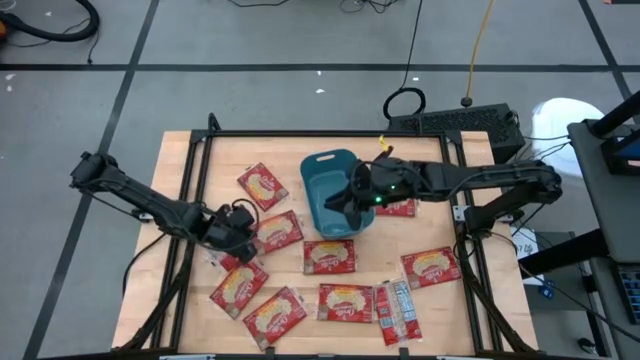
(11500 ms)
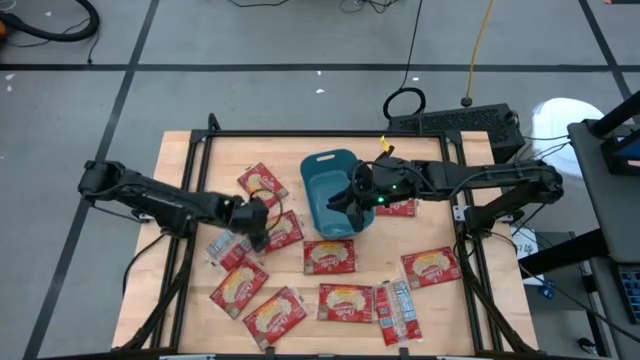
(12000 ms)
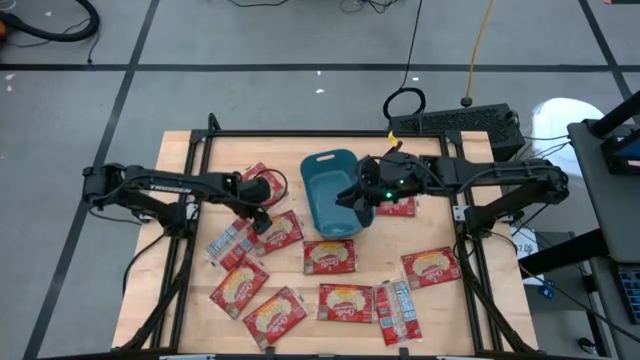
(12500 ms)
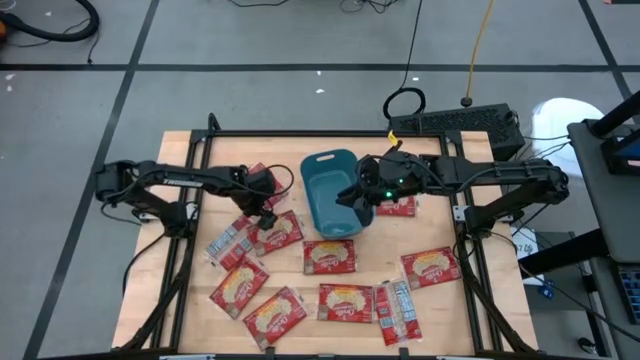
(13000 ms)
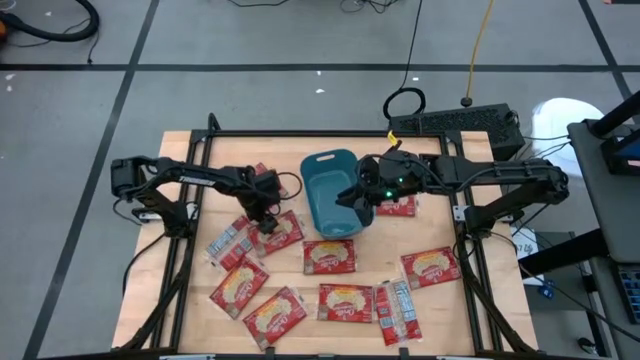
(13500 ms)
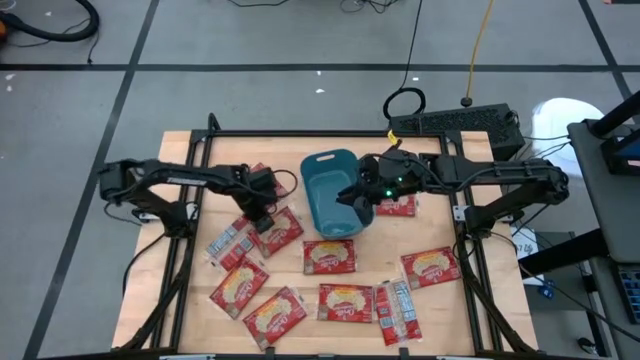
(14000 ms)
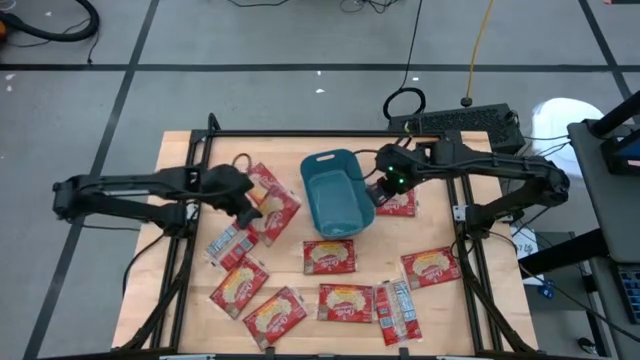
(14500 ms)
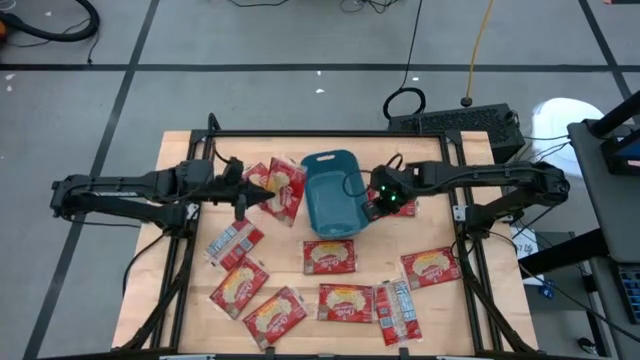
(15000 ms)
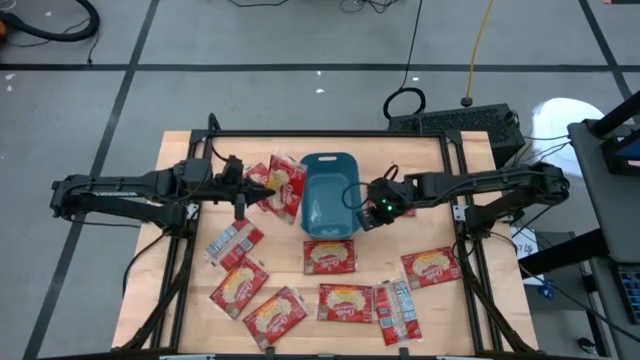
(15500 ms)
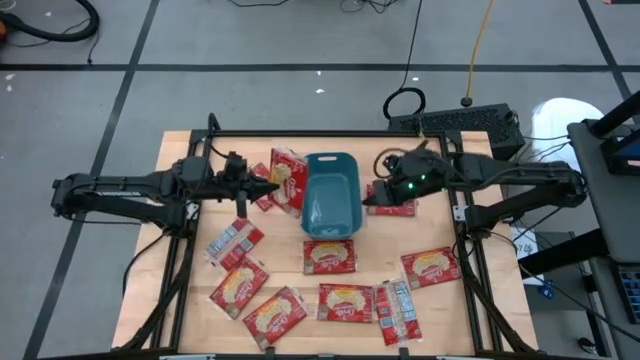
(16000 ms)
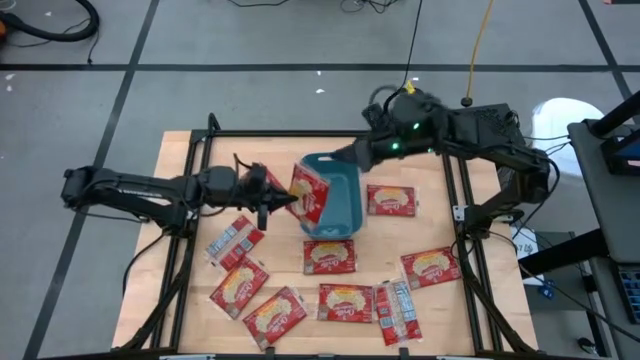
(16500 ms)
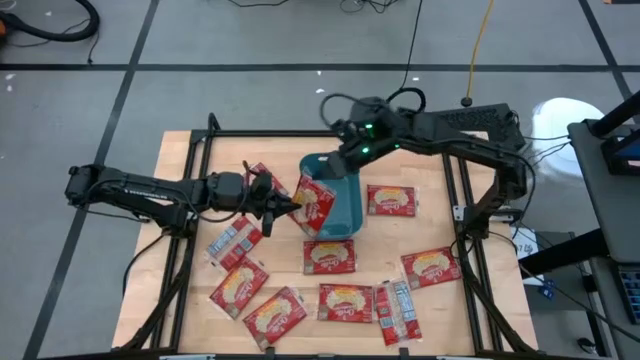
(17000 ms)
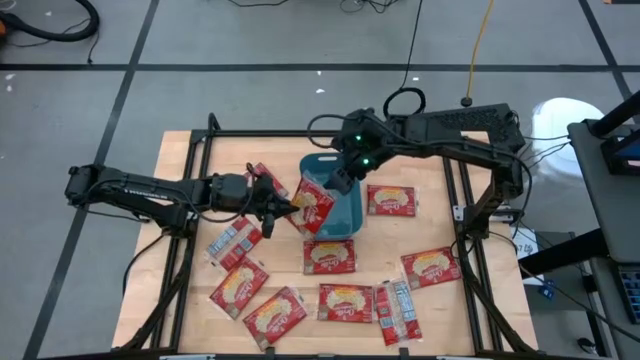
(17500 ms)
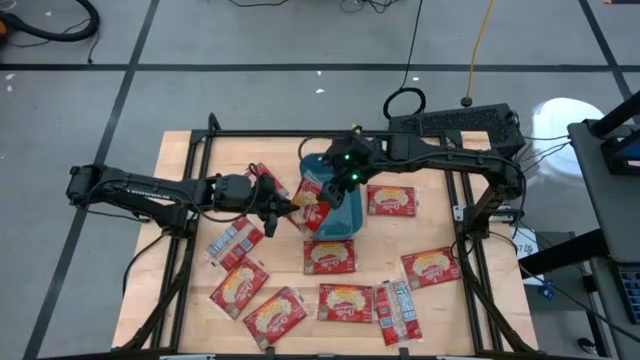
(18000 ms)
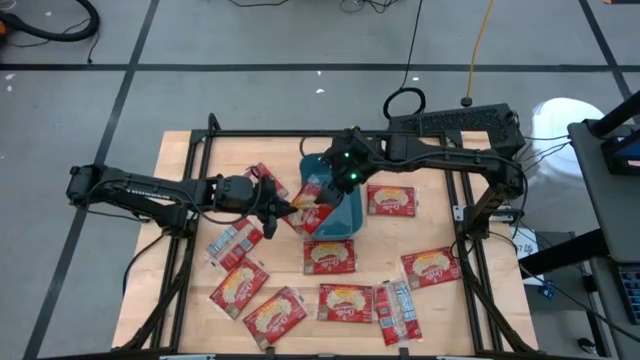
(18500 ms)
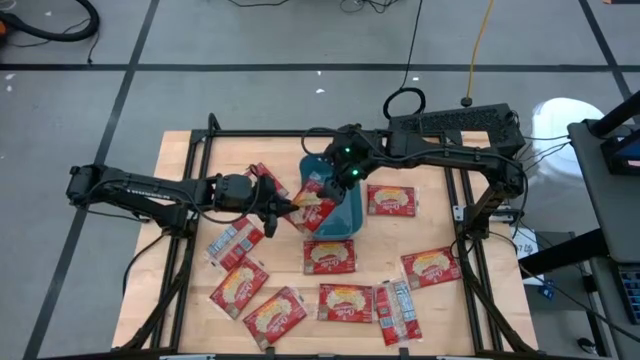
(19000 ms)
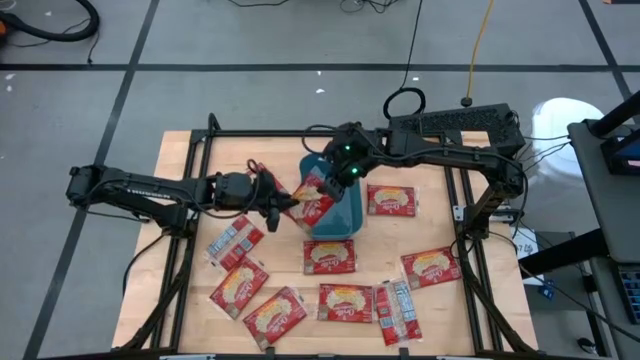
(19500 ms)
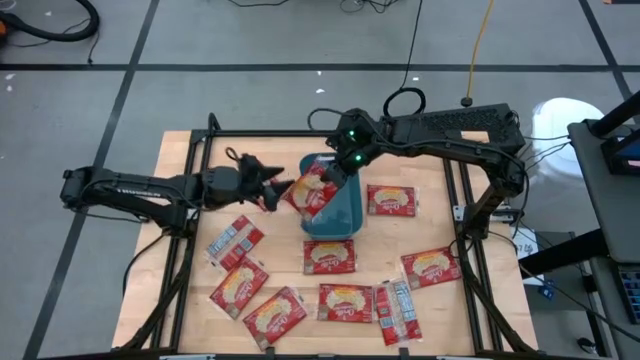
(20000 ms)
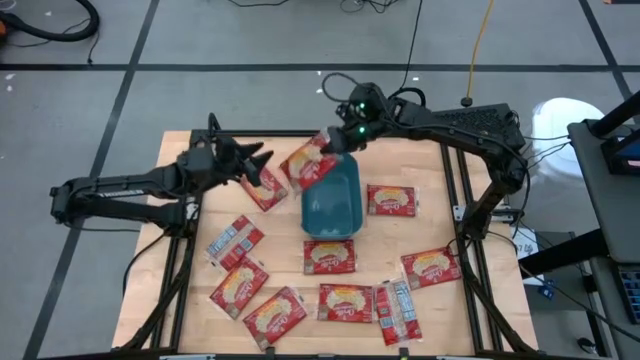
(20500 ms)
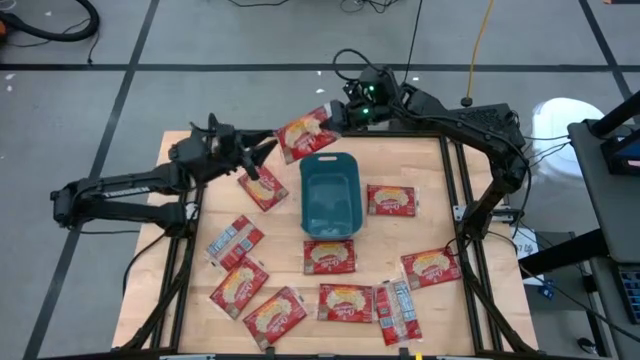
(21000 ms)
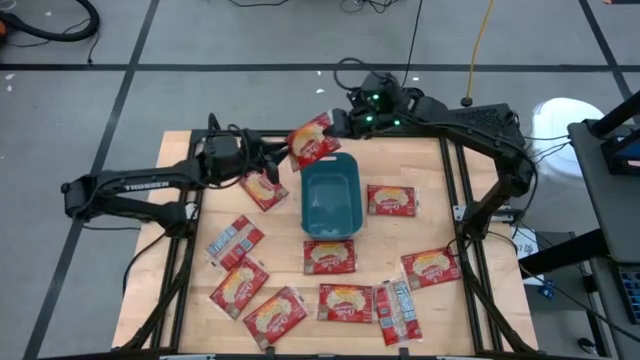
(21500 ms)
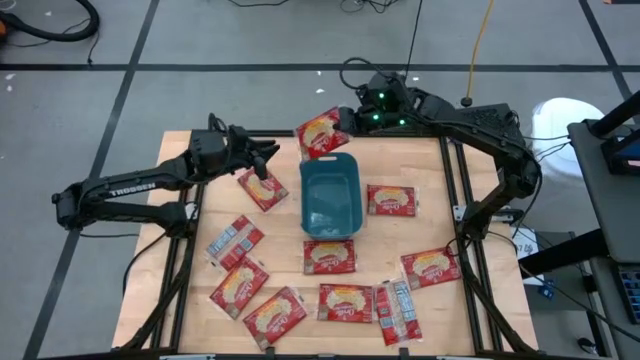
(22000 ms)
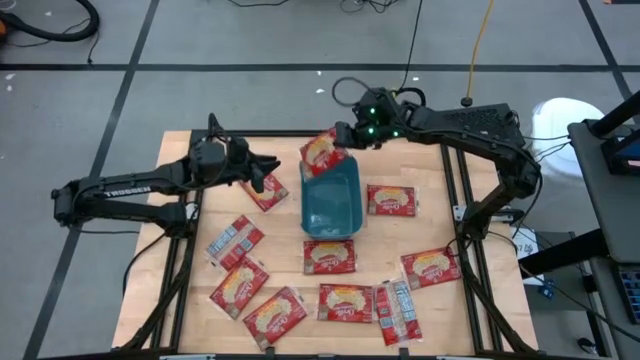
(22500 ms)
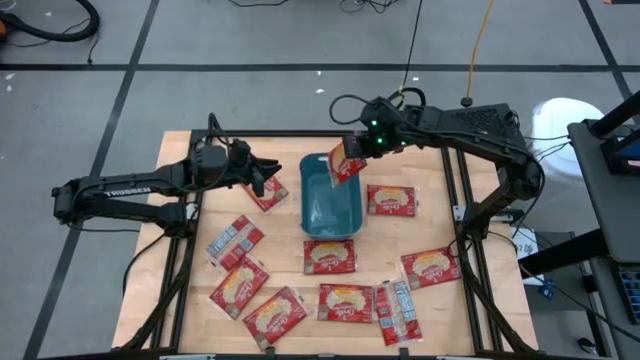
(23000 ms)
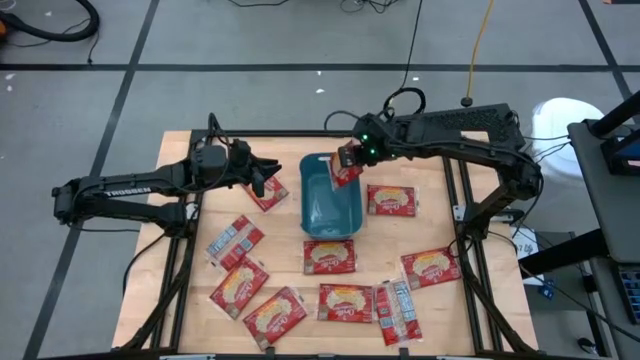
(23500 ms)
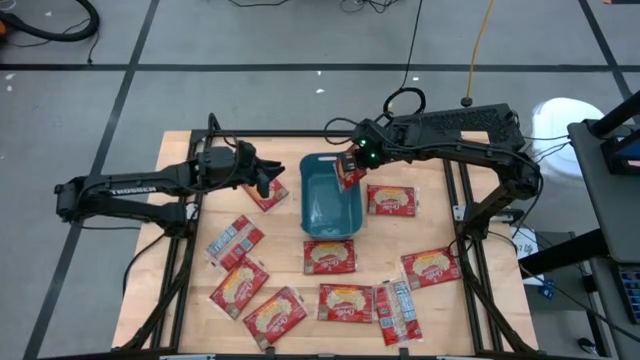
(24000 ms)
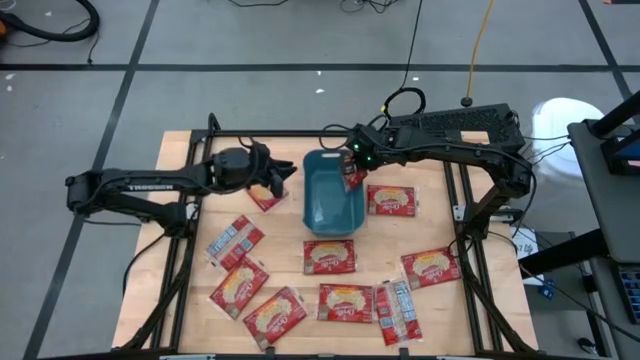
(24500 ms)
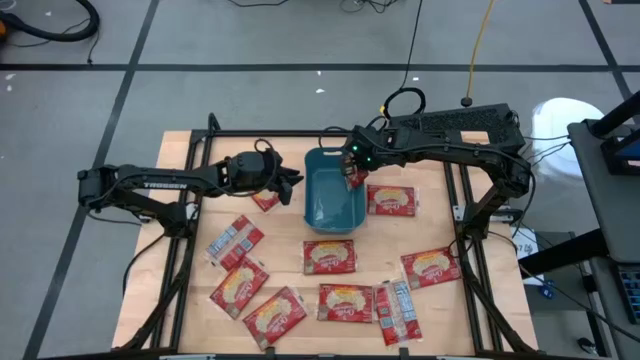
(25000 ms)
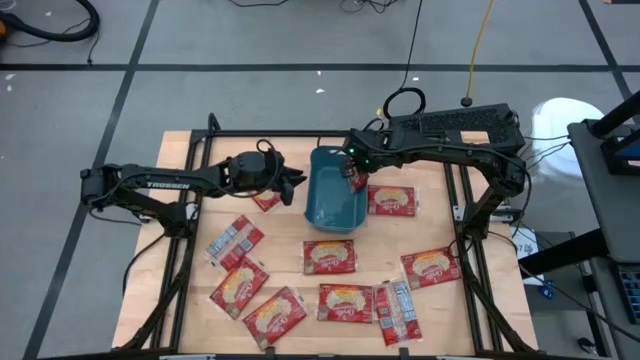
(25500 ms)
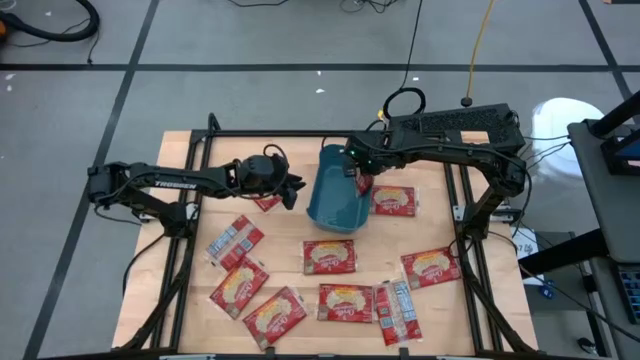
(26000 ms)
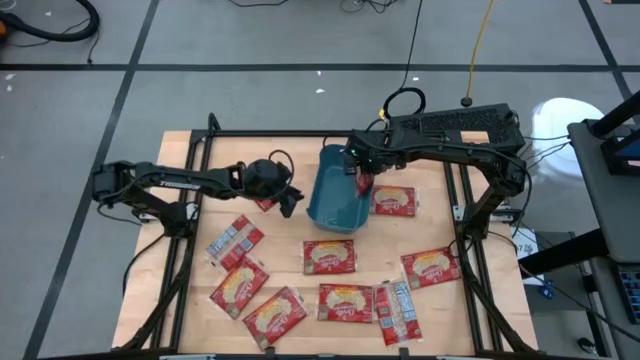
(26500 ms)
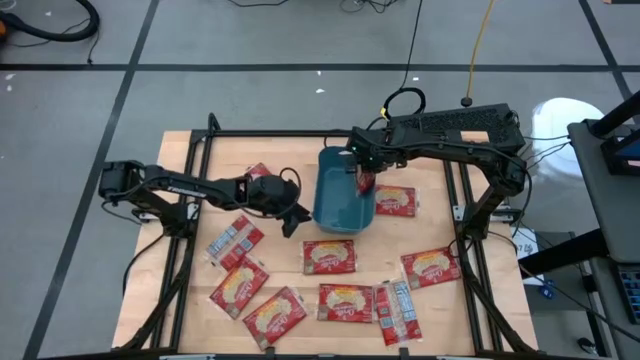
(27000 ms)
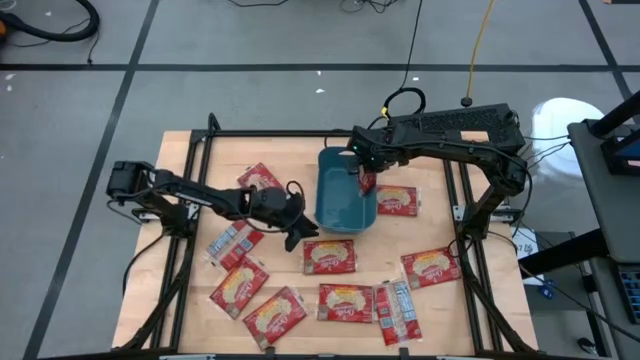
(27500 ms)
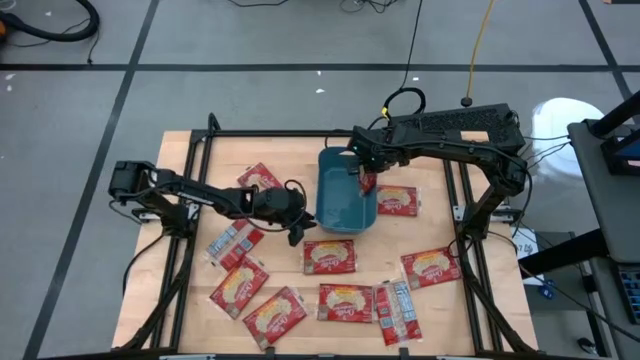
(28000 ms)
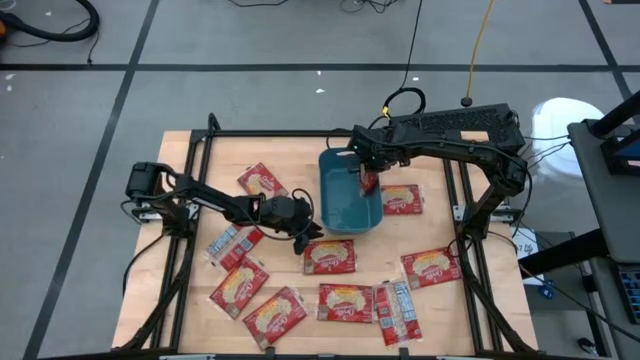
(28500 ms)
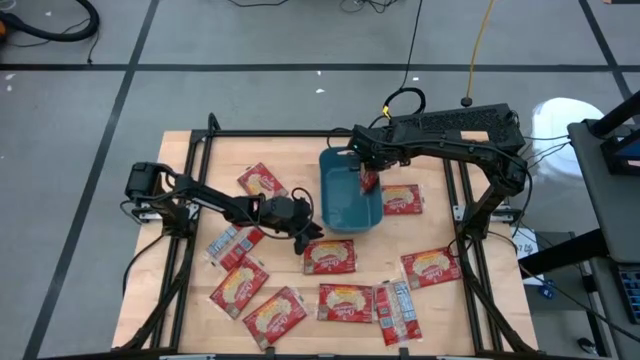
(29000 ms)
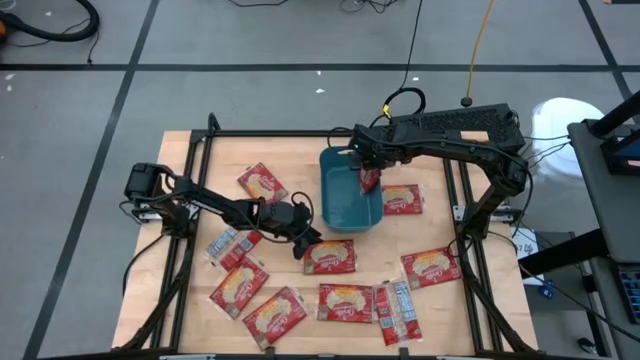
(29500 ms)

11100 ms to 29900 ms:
Task: Sort popcorn bags into baskets
Put the red popcorn bag into the blue bin

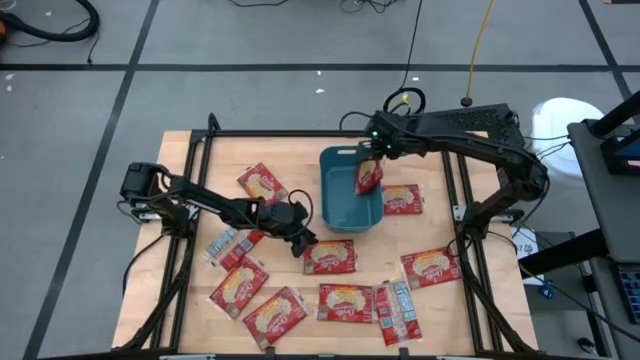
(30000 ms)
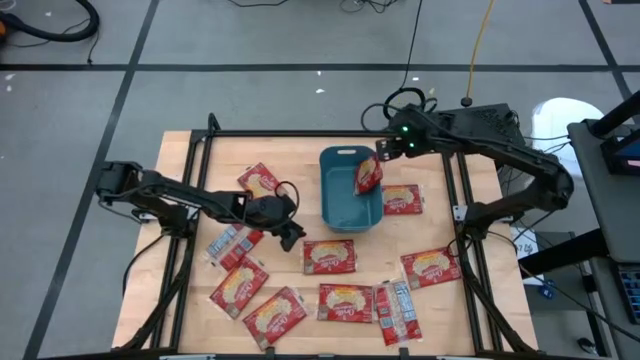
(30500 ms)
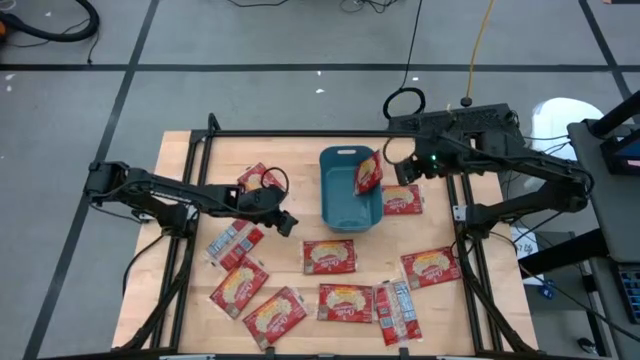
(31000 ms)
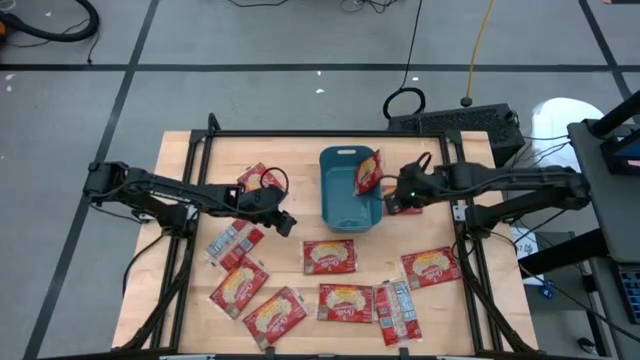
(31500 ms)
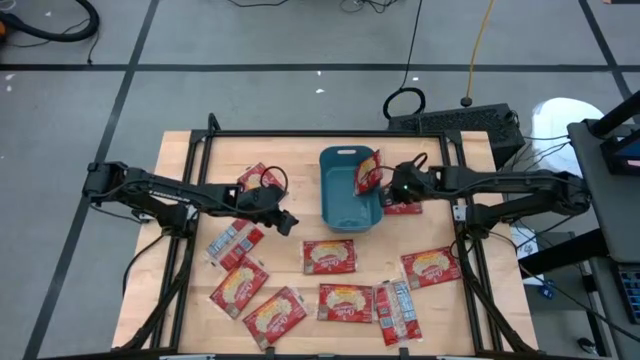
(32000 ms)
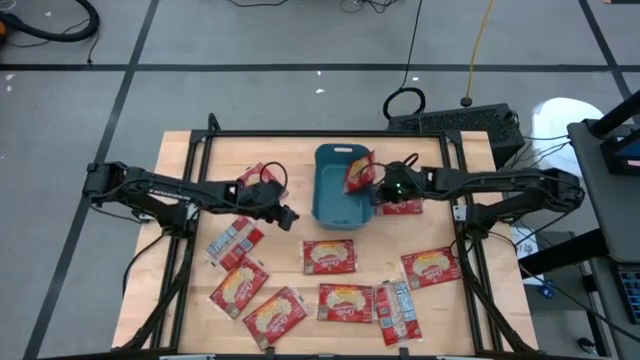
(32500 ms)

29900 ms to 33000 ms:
Adjust the blue bin

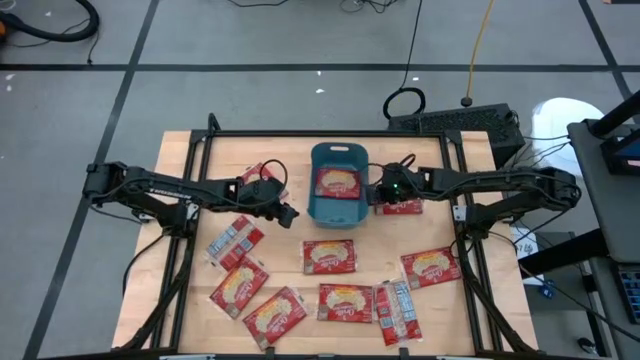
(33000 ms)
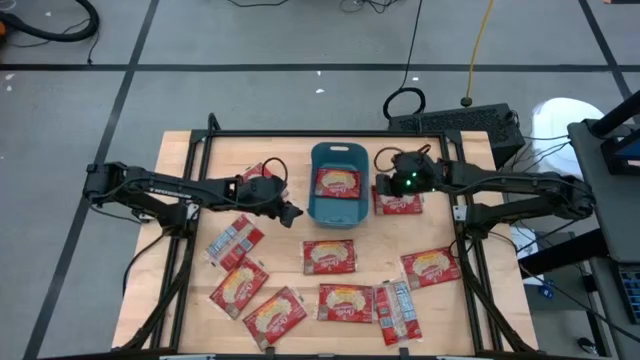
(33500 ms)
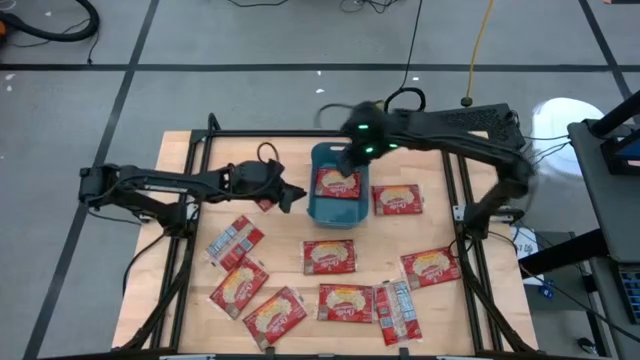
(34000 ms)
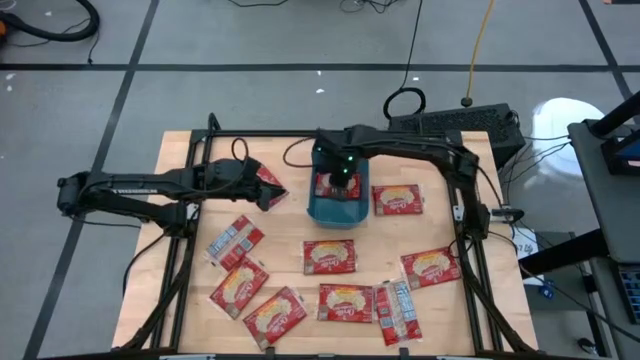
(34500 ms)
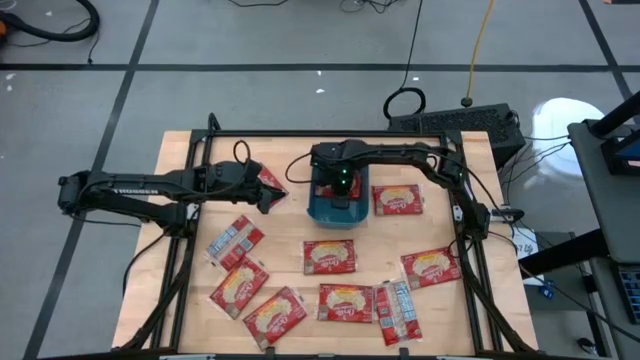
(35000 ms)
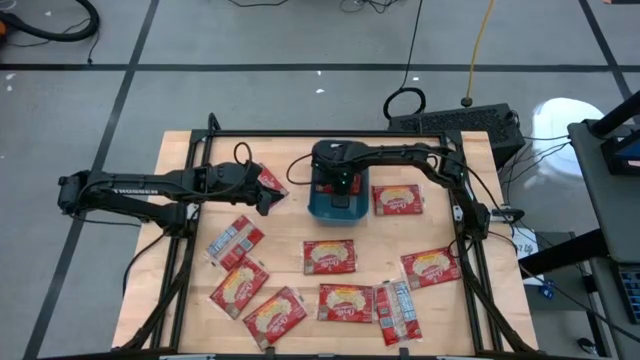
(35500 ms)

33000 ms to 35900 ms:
Adjust the red popcorn bag in the blue bin
